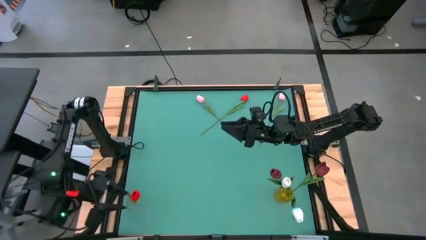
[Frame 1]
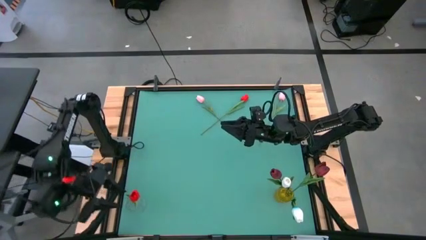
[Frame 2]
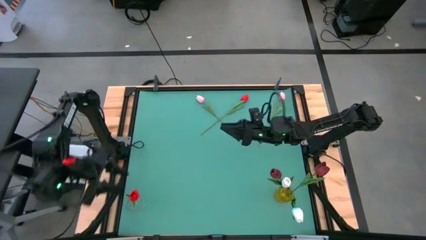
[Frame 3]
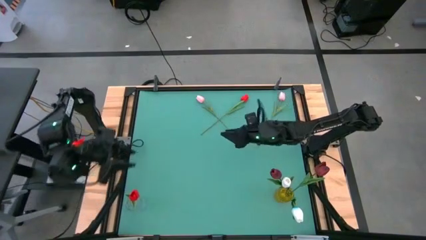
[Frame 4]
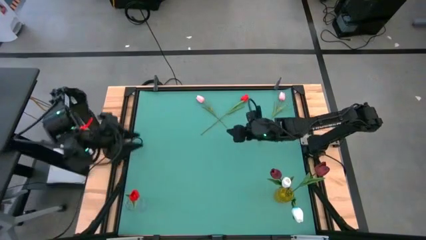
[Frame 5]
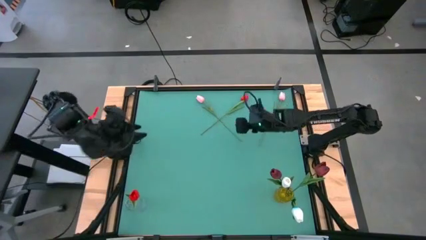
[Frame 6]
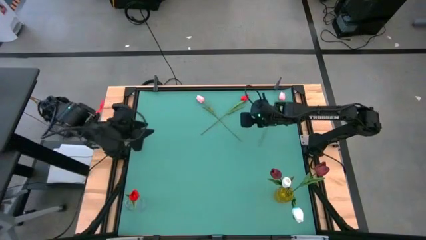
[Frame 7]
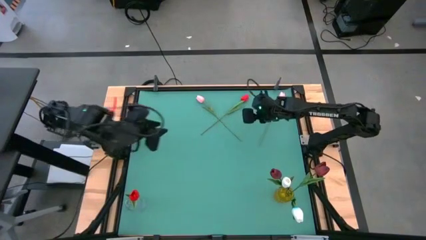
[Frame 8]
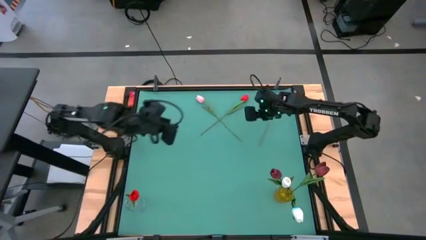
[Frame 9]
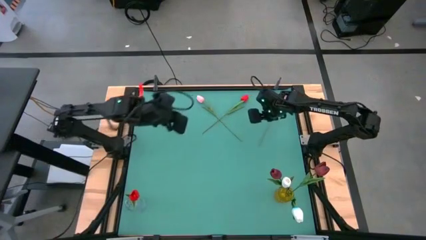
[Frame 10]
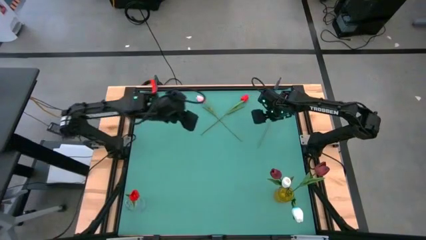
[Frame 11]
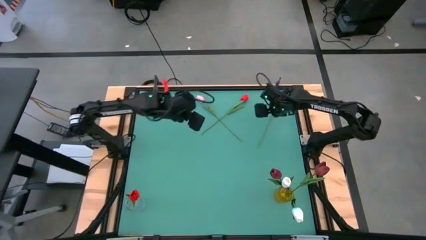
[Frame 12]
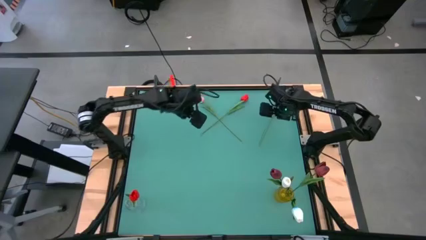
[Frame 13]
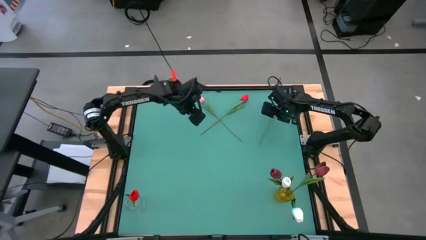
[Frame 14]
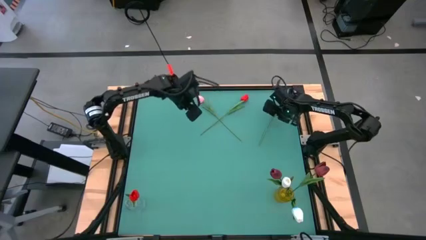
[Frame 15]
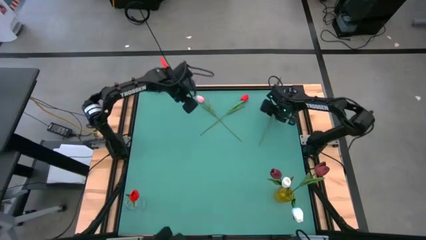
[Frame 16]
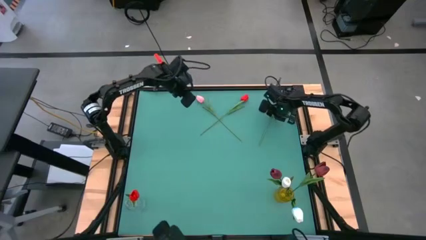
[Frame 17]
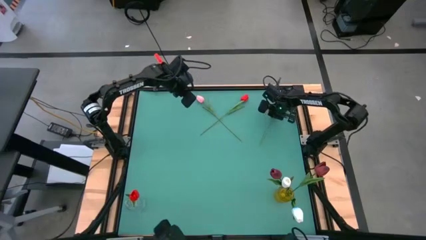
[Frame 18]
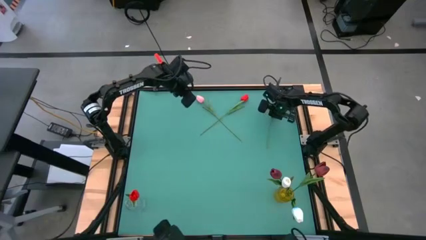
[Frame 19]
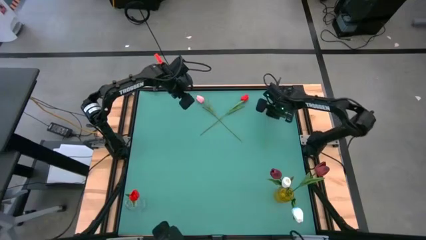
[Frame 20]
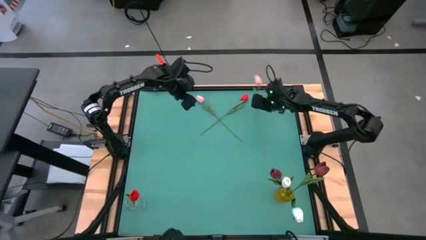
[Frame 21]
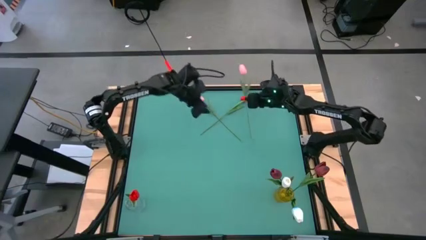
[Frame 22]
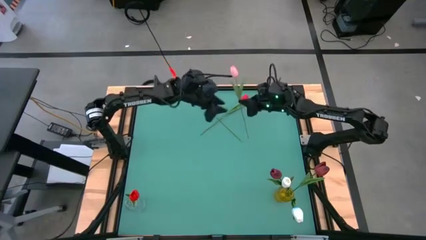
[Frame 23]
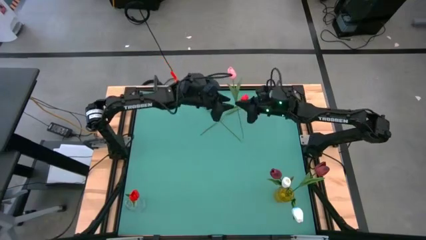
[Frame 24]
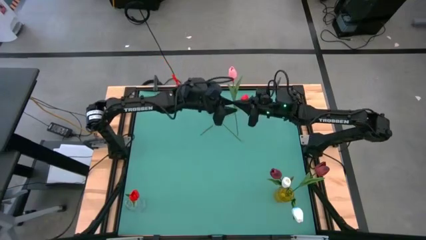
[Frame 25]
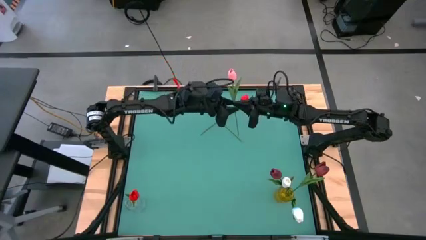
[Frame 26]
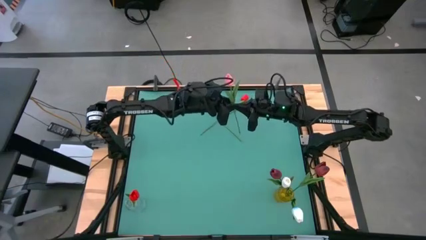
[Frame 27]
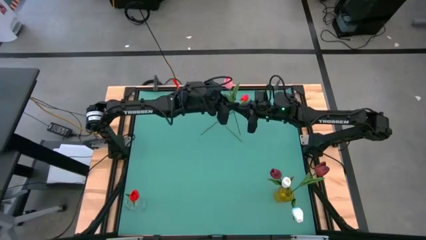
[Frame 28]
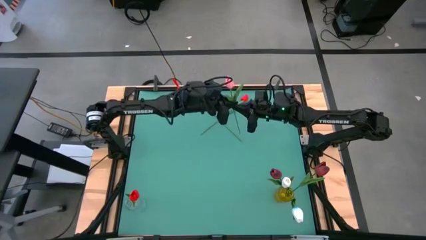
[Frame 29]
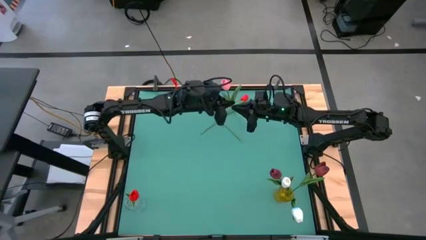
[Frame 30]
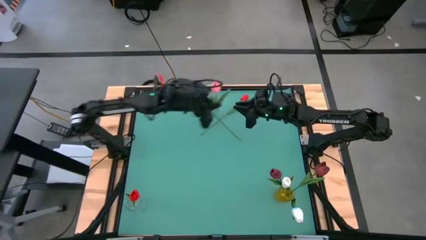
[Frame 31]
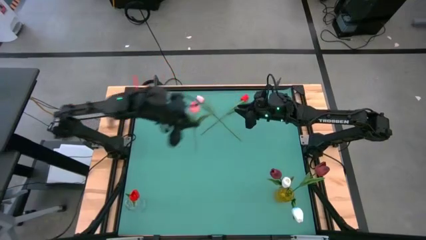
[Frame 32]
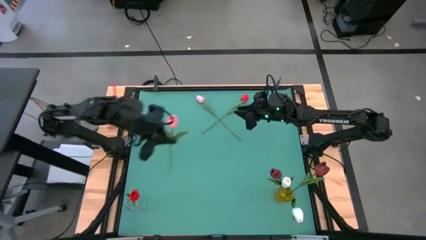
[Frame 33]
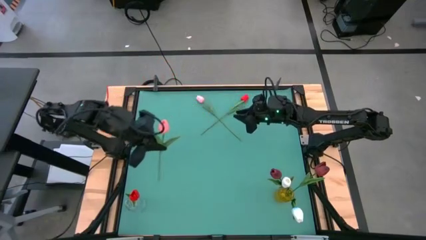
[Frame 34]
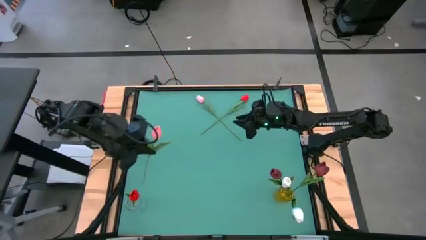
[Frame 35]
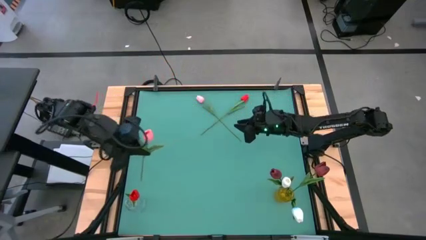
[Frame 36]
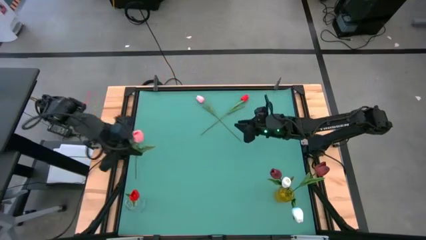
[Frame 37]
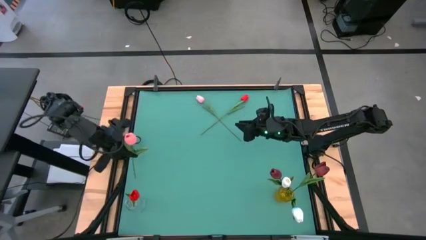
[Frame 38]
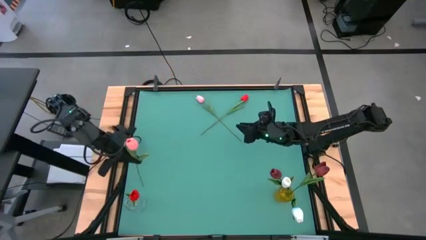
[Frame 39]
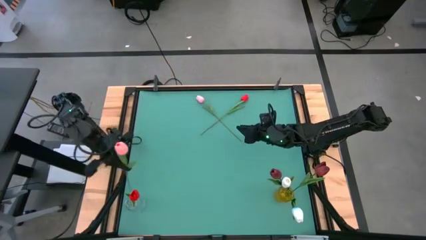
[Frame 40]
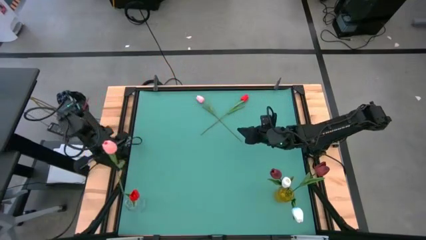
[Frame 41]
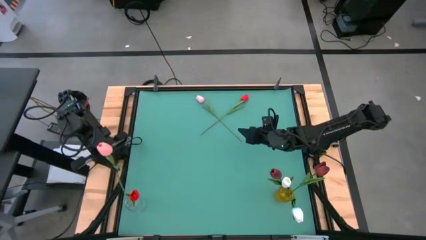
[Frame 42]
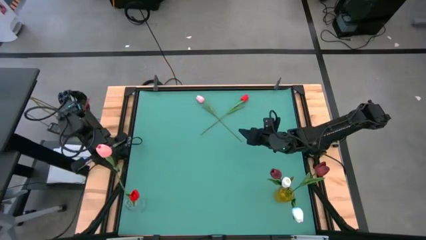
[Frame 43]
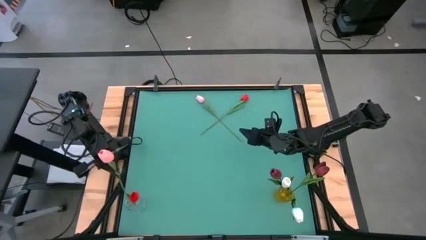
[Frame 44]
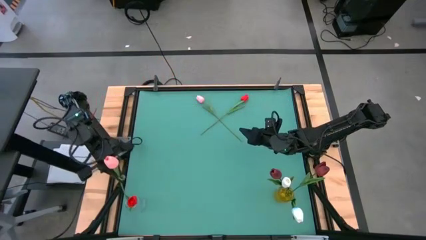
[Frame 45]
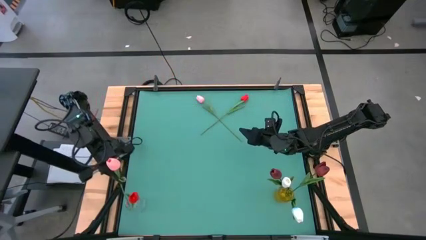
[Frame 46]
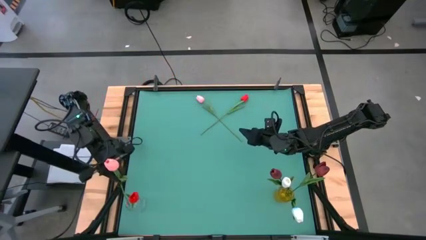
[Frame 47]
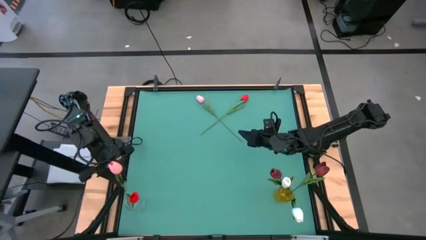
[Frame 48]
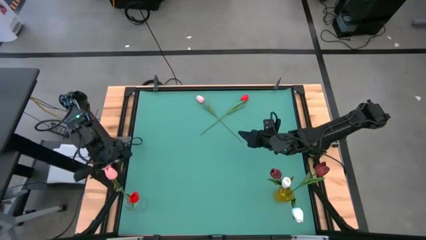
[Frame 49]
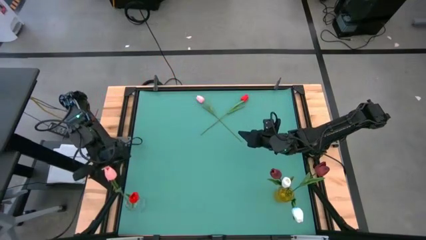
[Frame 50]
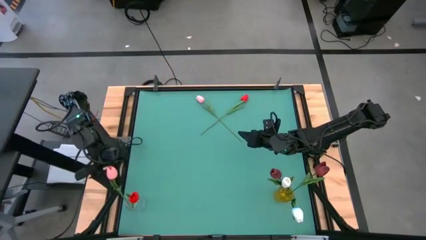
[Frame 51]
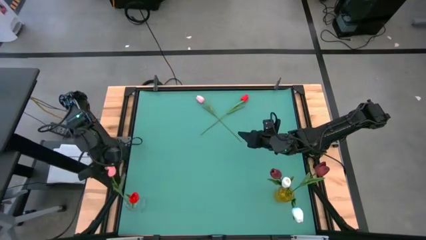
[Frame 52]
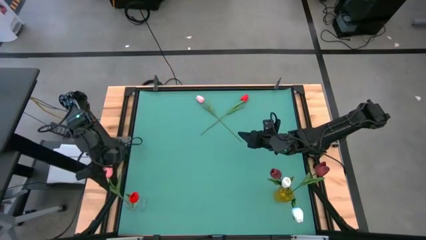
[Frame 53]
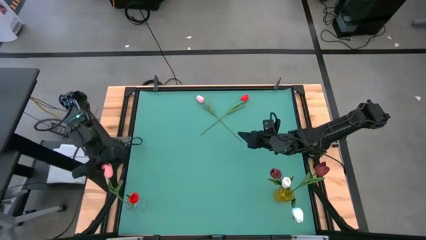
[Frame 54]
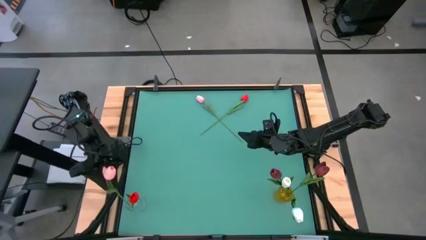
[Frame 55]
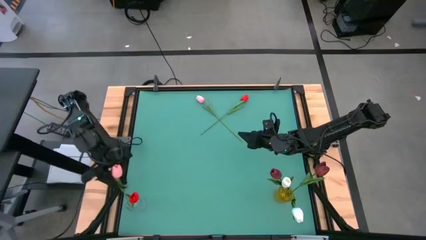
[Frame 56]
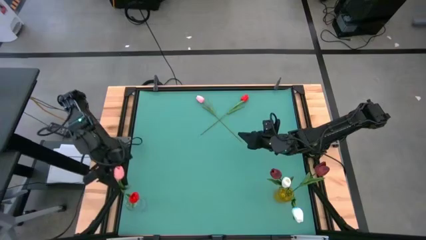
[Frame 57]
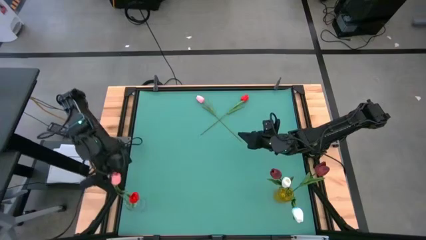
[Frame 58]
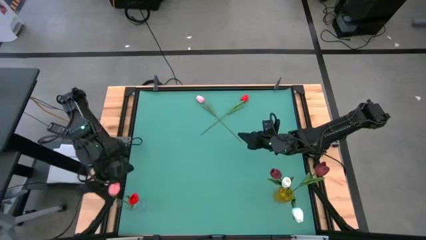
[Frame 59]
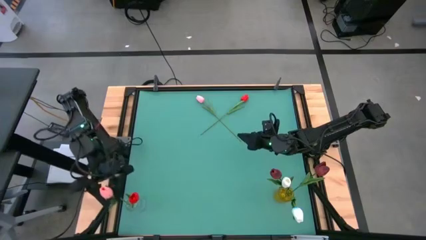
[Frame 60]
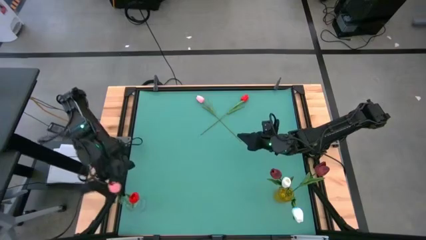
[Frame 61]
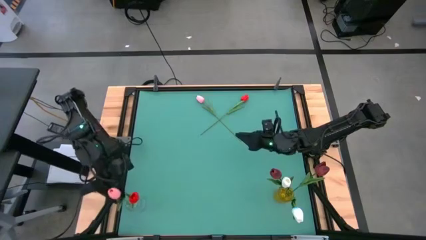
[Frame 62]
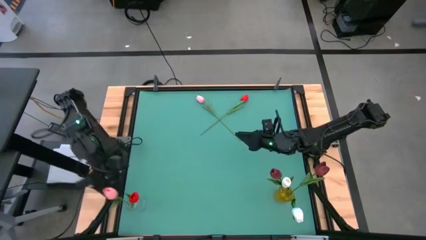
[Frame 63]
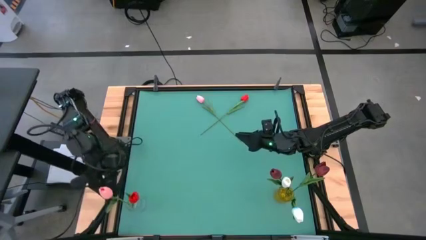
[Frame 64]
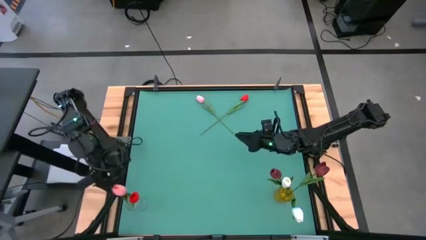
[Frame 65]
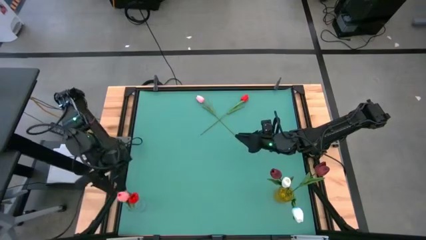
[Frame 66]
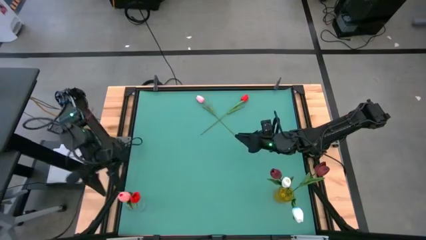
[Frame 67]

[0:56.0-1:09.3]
Task: Sort flowers into vase by color
Put the right pink tulip into the transparent flower vase
